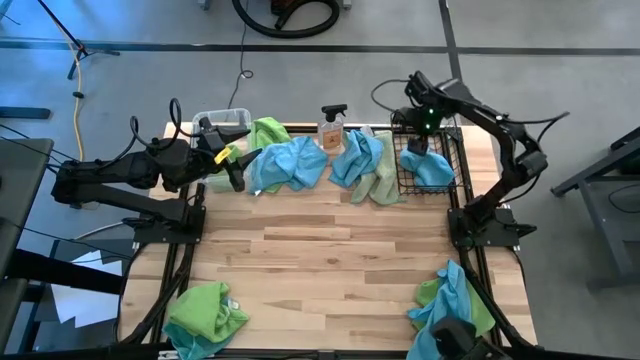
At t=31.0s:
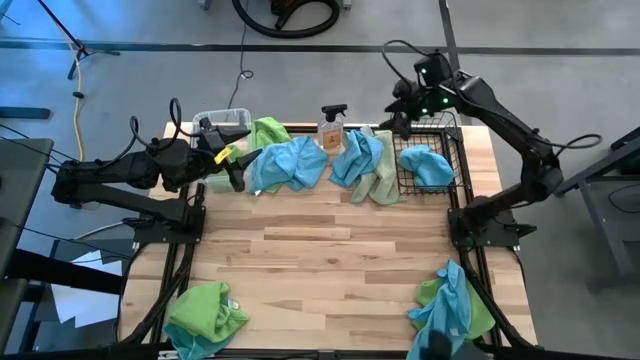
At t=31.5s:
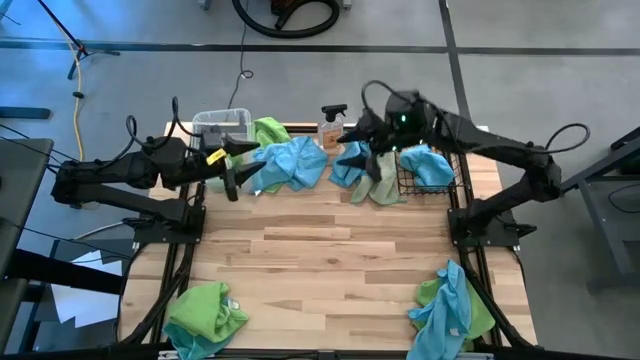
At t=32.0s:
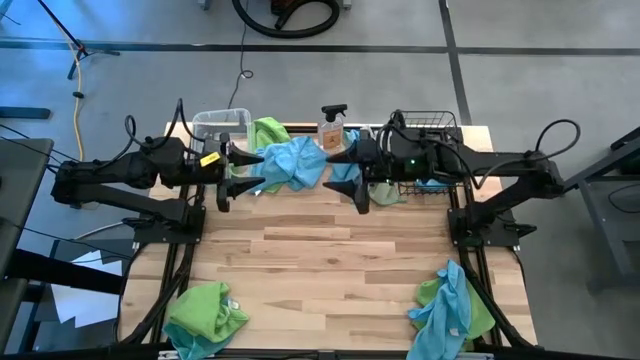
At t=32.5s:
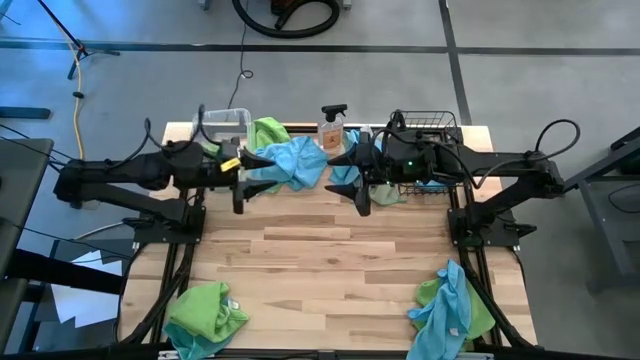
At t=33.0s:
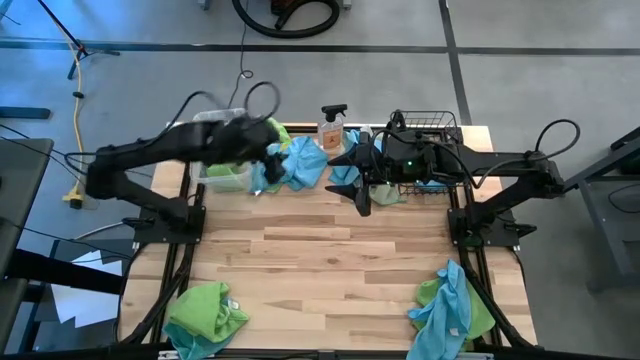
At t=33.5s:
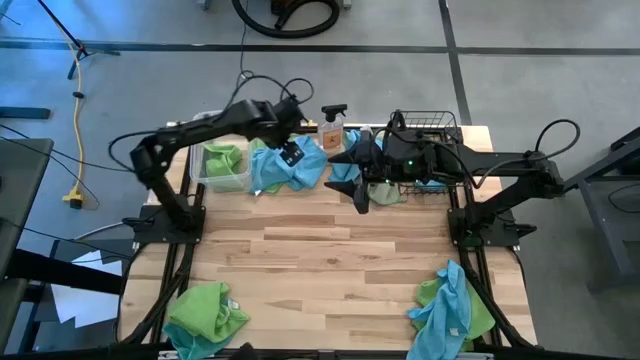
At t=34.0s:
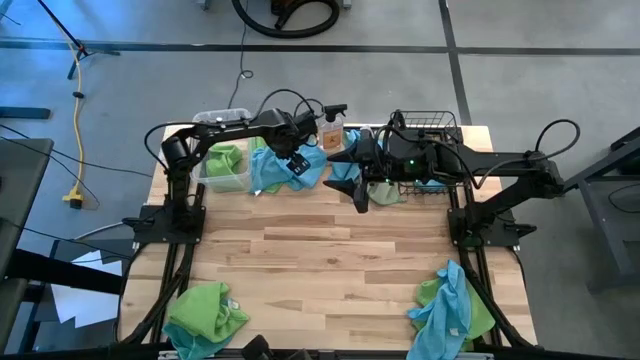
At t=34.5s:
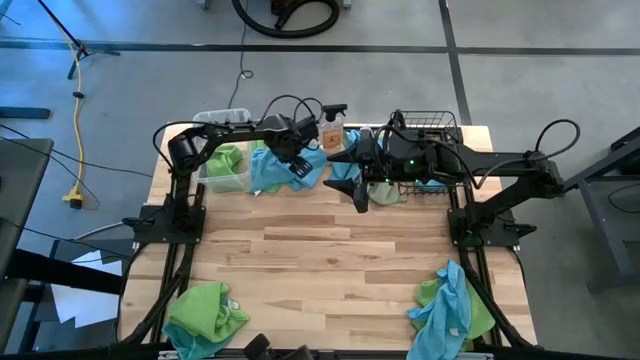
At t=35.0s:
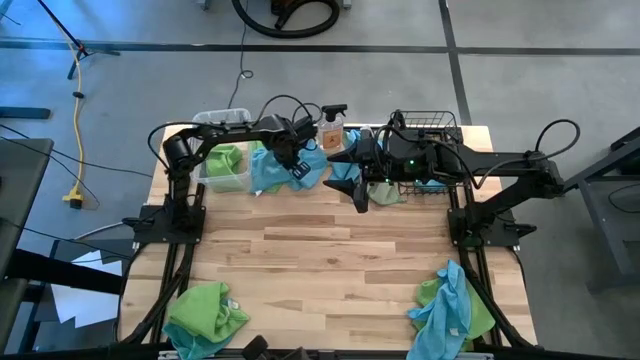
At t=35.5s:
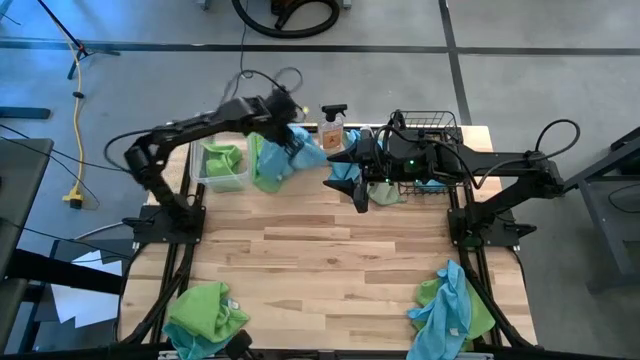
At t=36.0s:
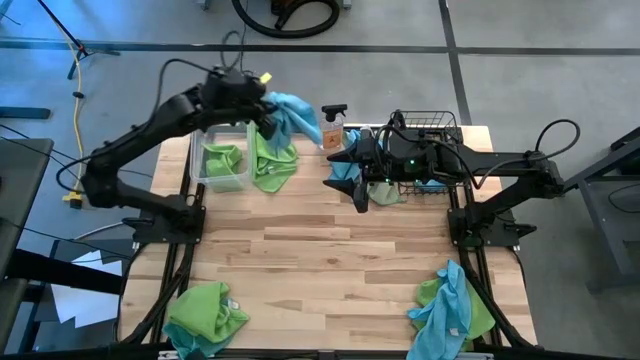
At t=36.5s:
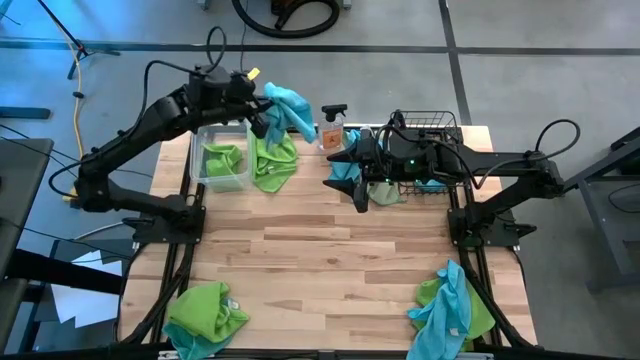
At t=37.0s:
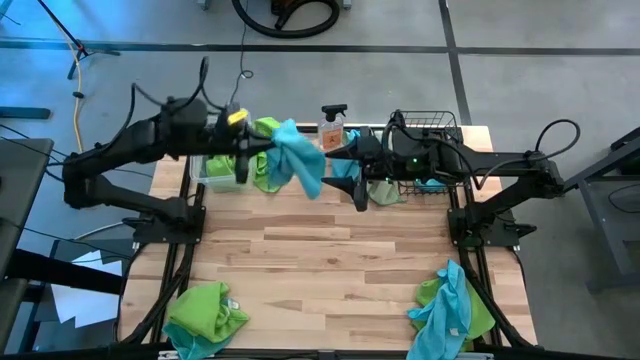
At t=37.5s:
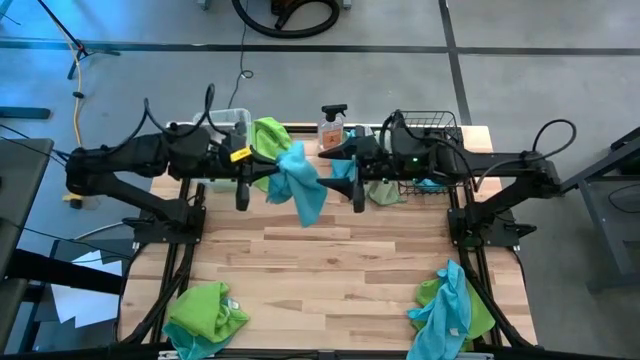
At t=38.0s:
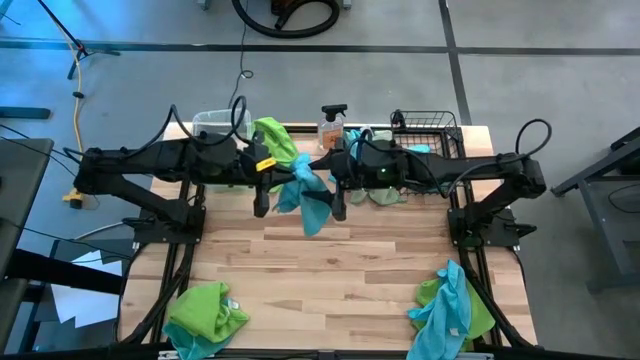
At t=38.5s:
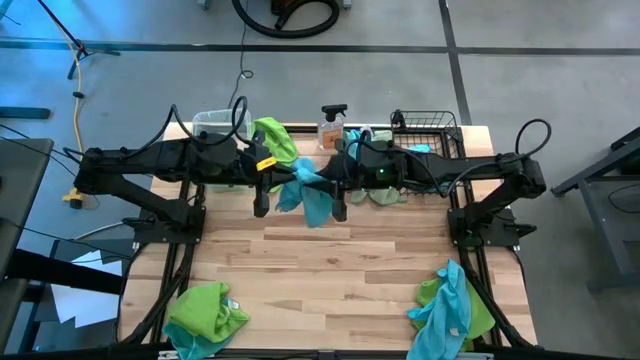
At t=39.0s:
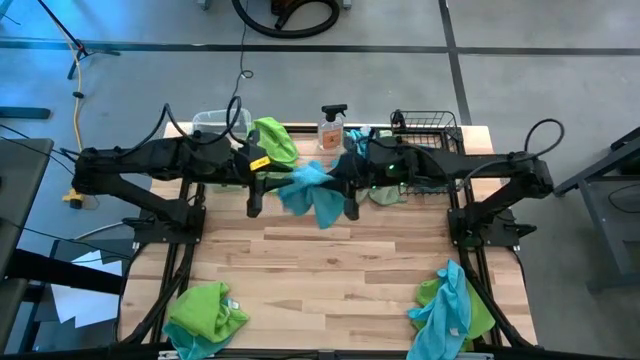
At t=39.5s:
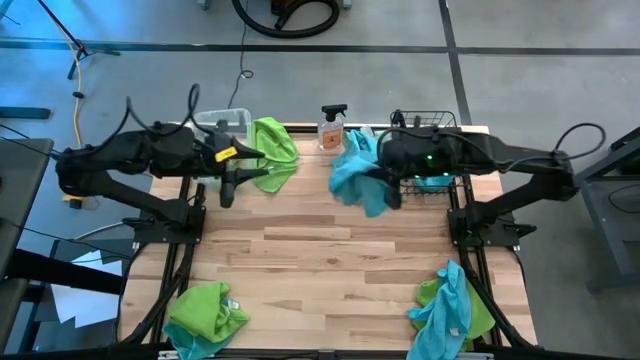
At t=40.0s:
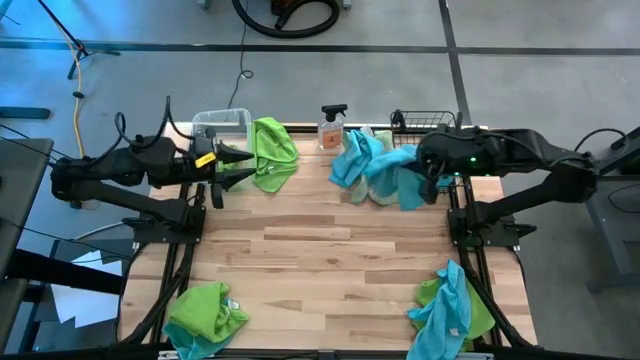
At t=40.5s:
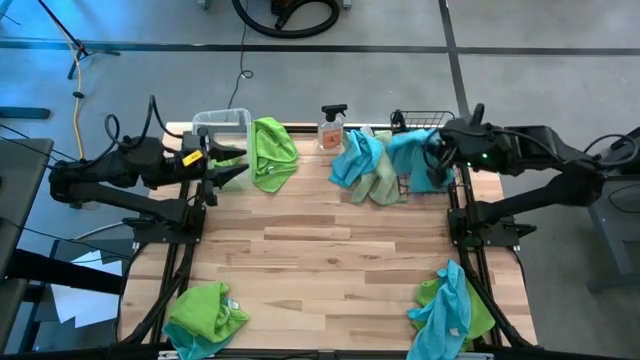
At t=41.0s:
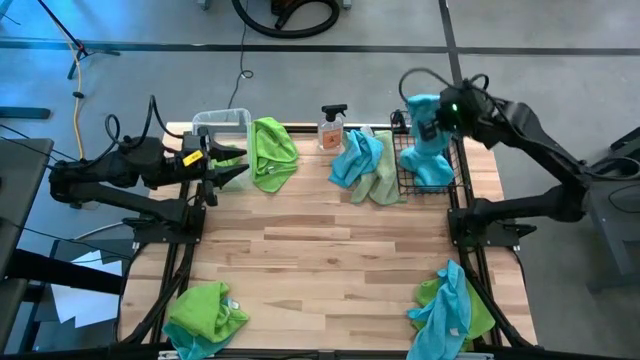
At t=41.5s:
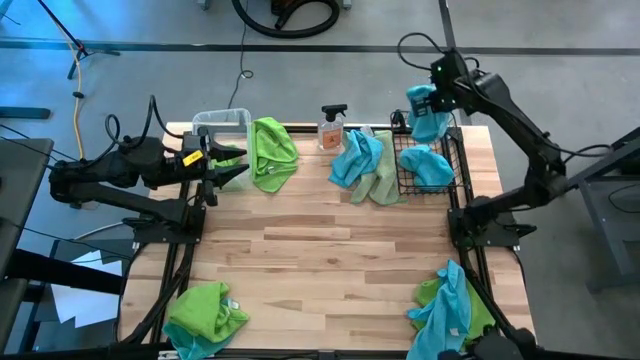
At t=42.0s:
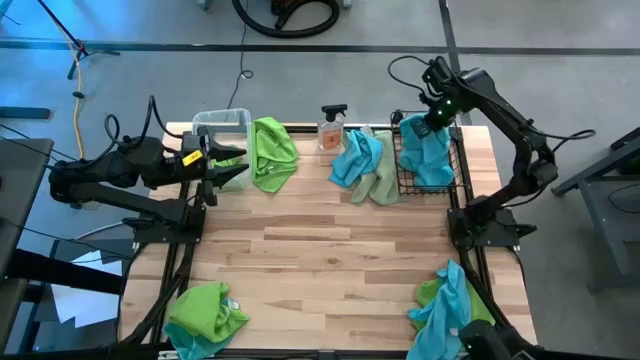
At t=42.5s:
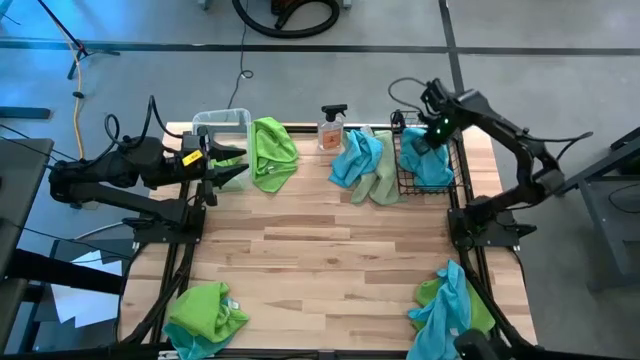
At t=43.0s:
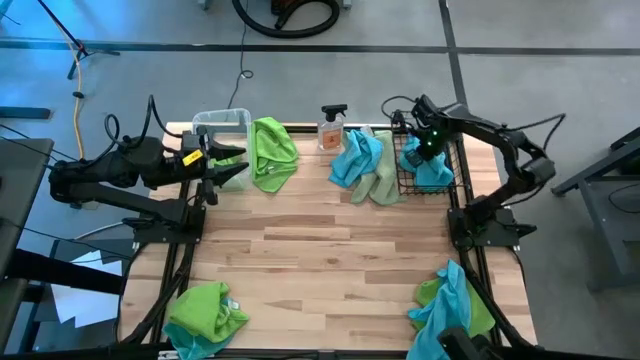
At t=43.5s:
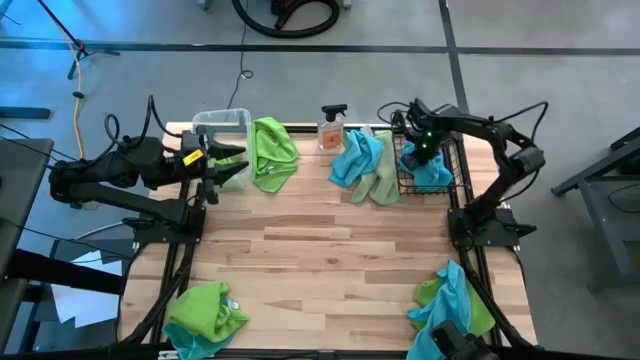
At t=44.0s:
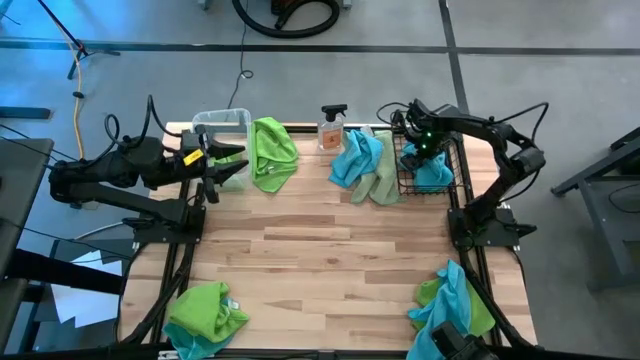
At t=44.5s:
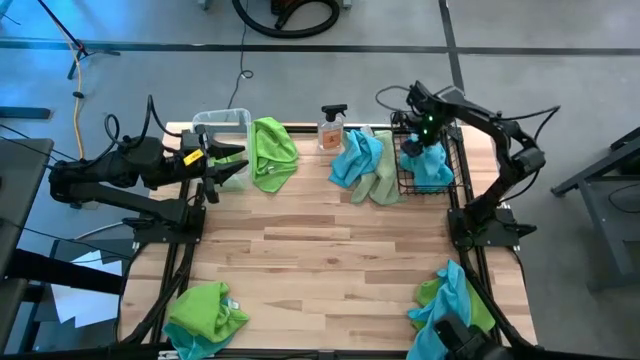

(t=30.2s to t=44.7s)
Task: Sort microfiber towel by color & place in baskets
Put the blue microfiber cloth into the basket

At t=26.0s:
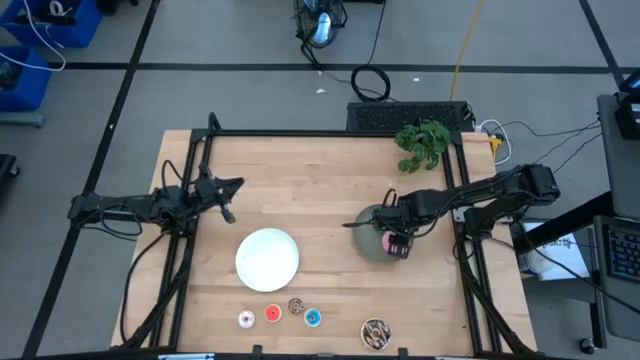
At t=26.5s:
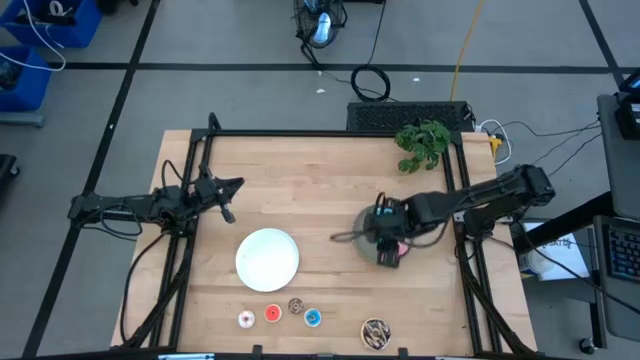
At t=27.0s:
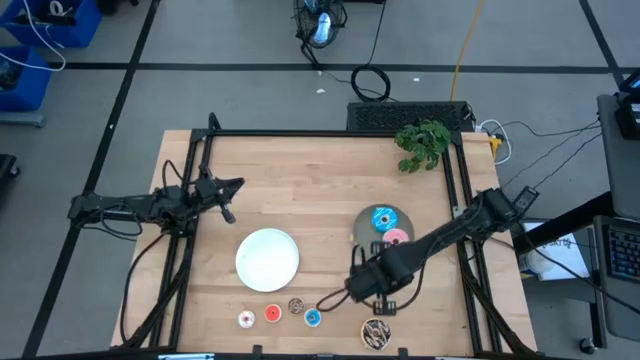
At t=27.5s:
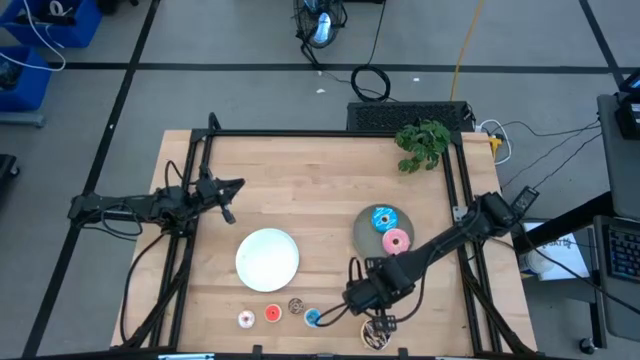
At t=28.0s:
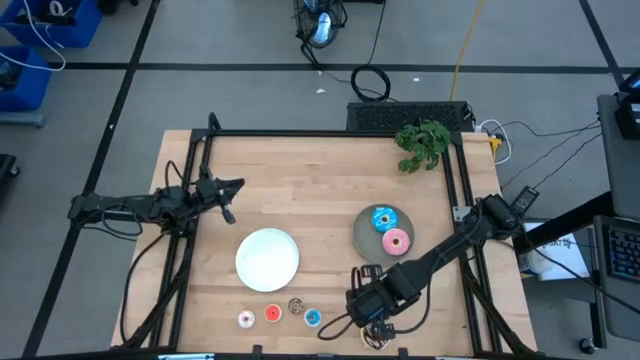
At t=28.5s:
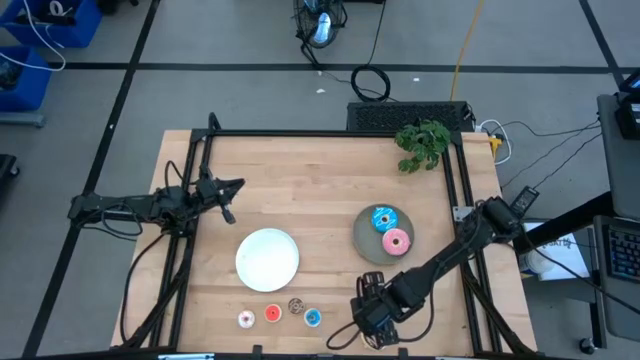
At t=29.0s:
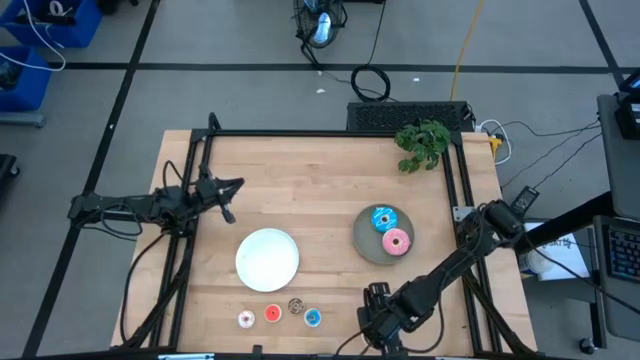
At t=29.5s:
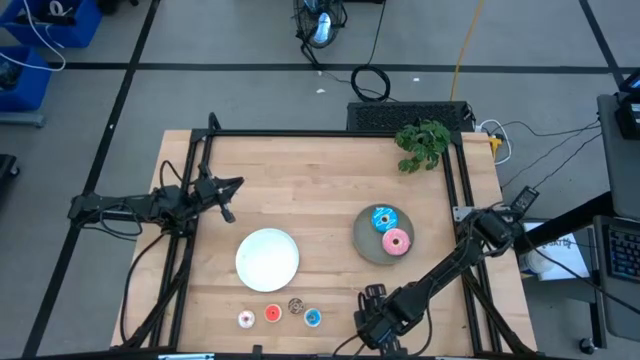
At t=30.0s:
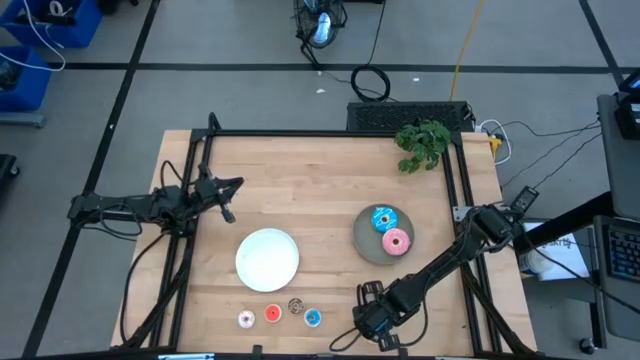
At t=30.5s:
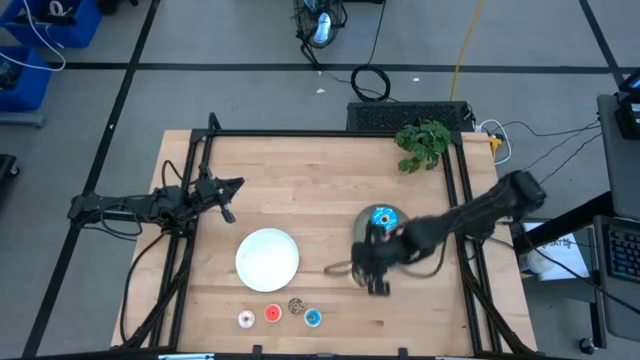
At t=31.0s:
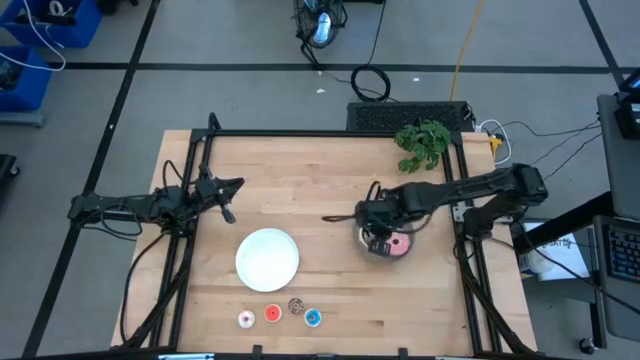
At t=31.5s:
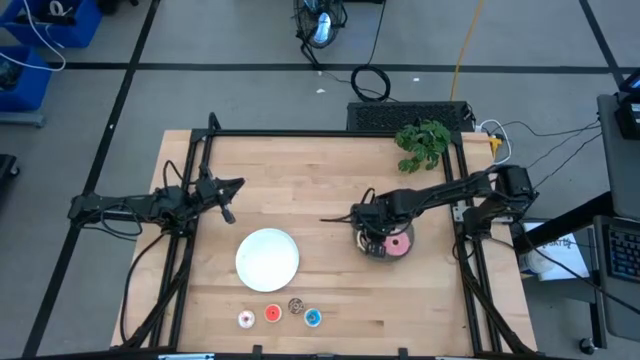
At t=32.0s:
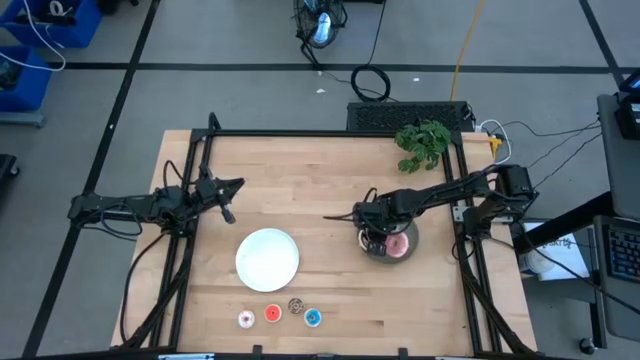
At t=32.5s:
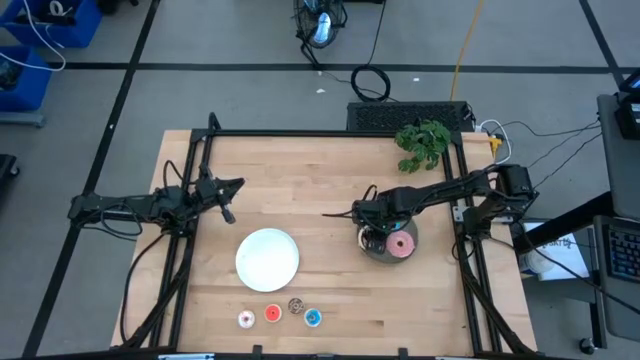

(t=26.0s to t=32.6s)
Task: Pick & Place donuts
Put the large black donut on the gray plate
